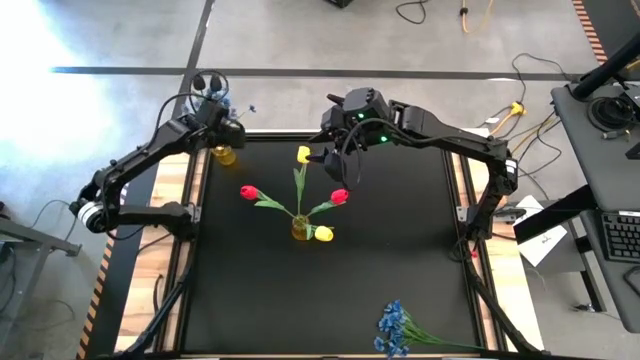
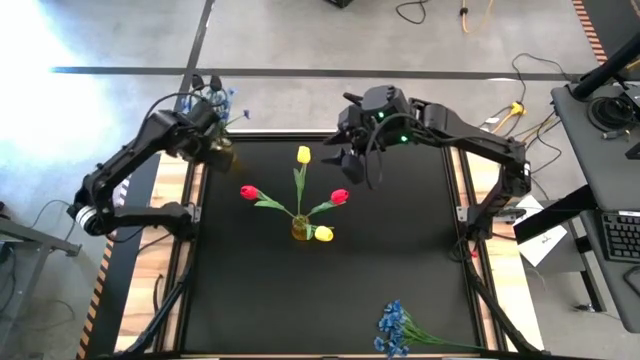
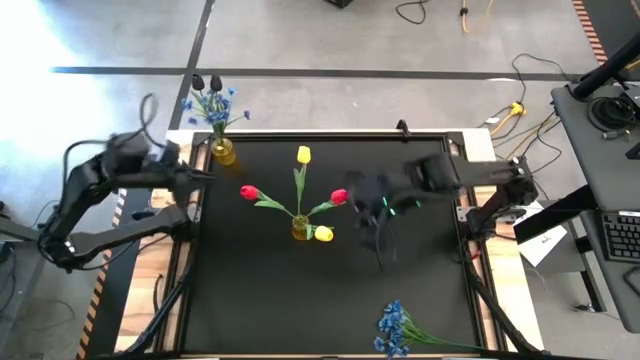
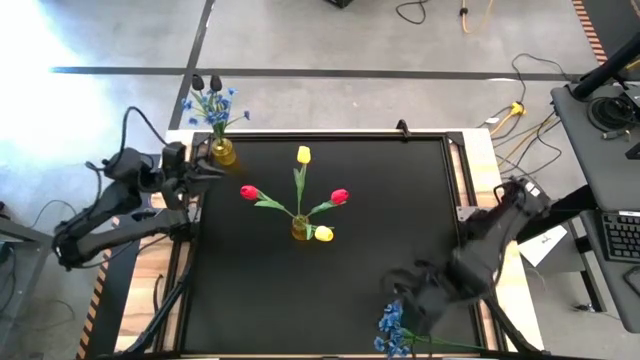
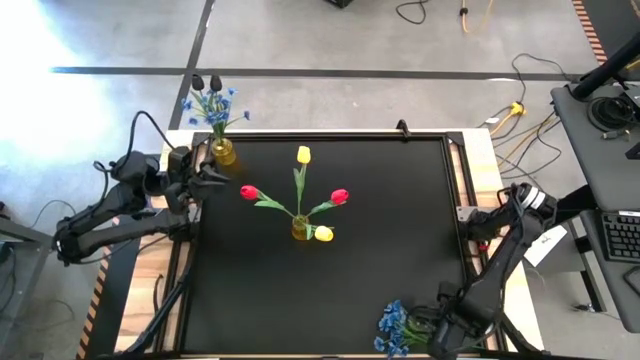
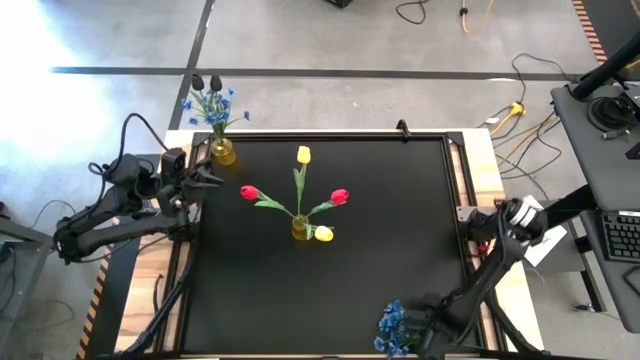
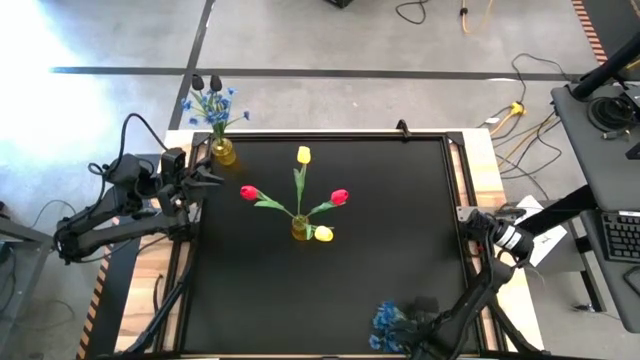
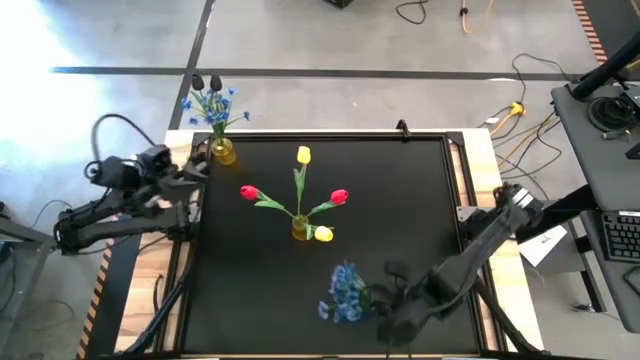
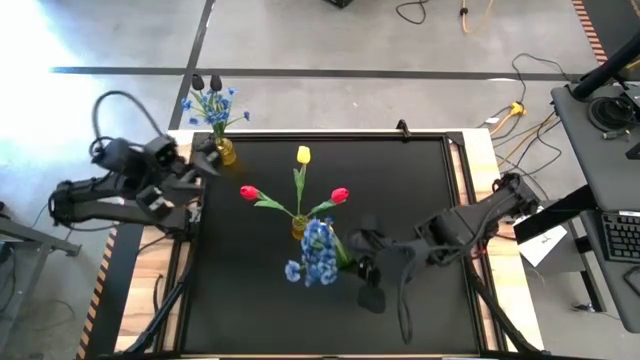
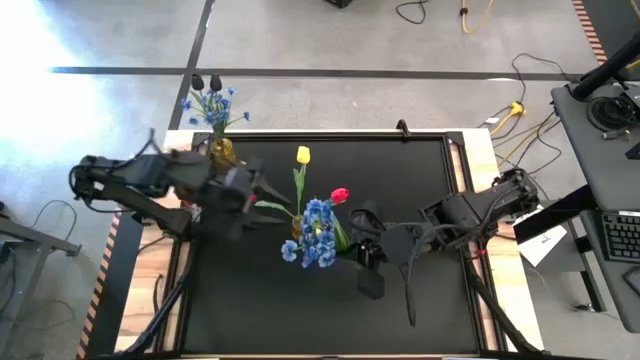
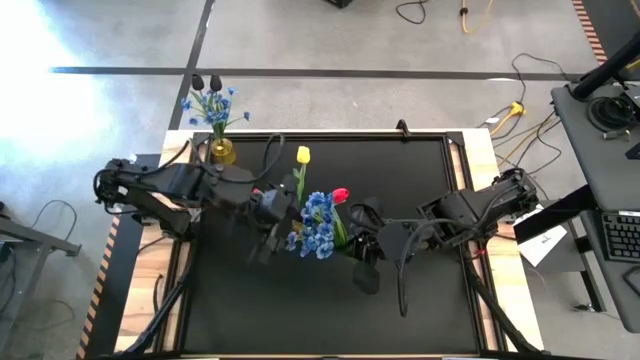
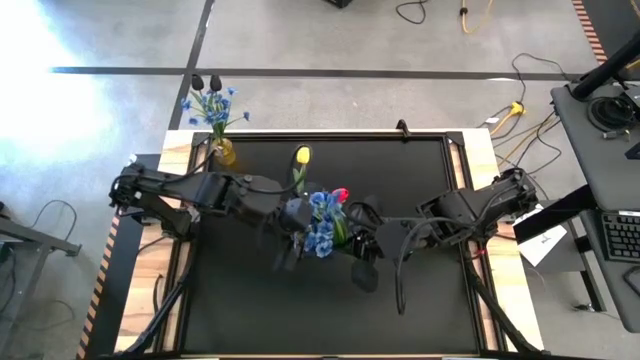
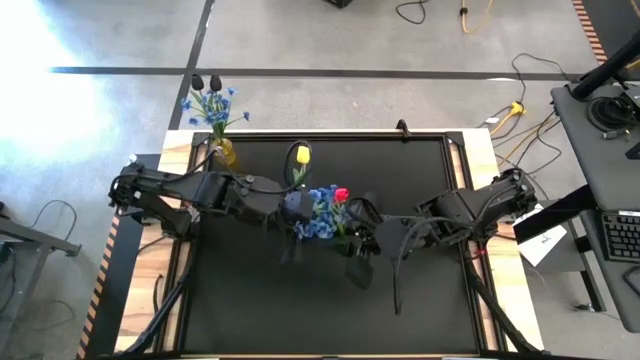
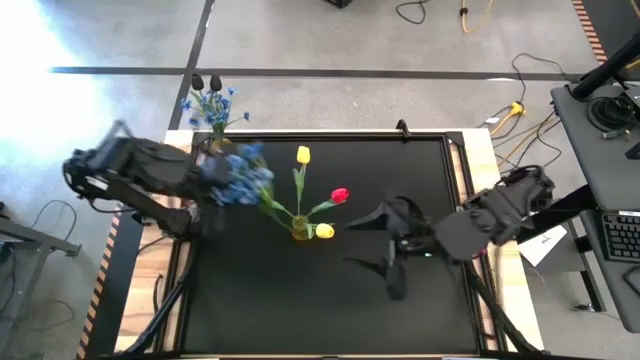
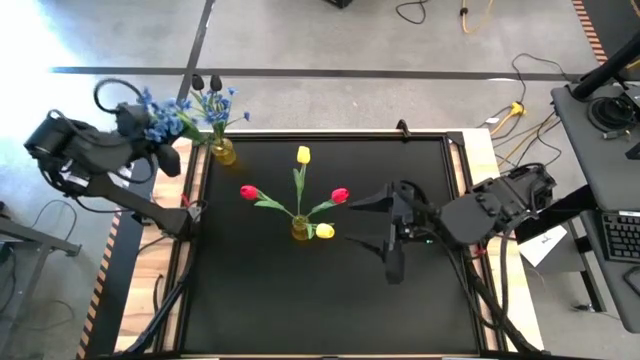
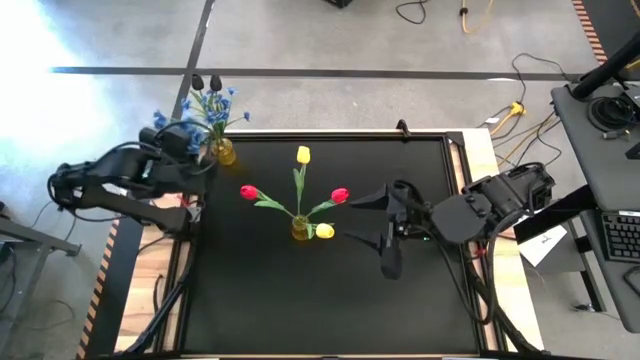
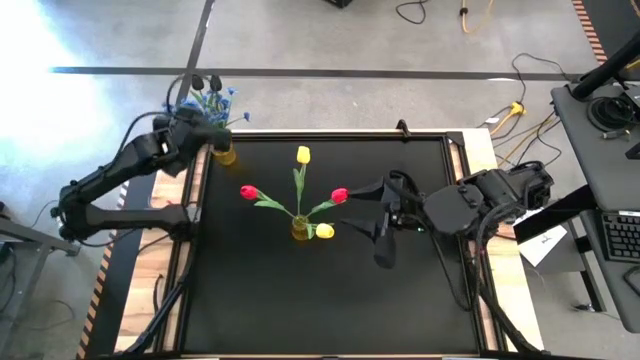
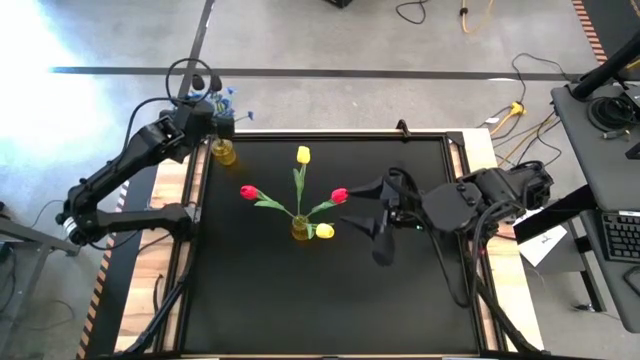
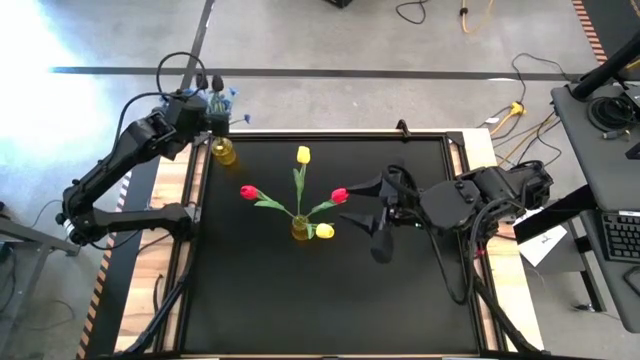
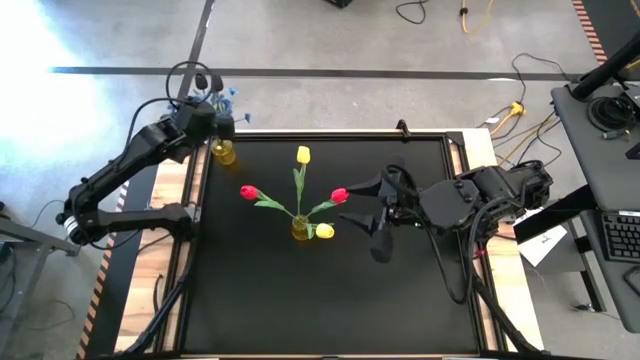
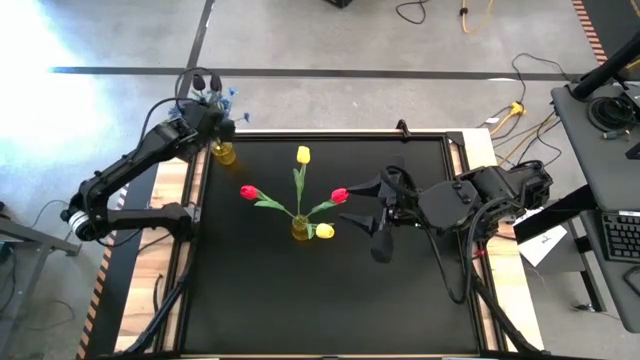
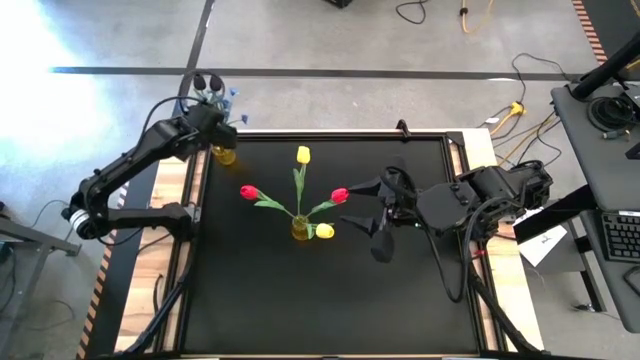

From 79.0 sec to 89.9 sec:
Task: Sort flowers into vase by color
Put the blue flowers into the top vase

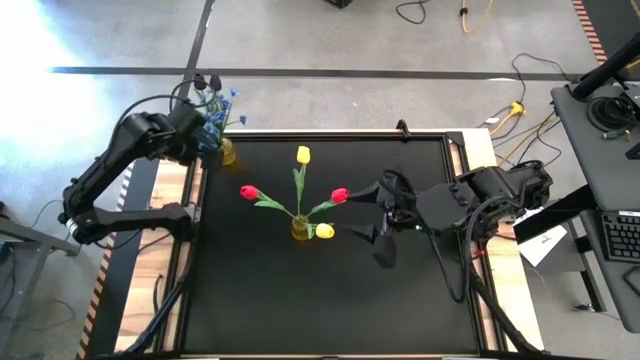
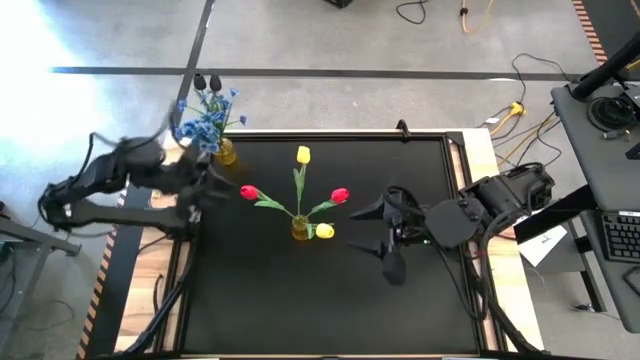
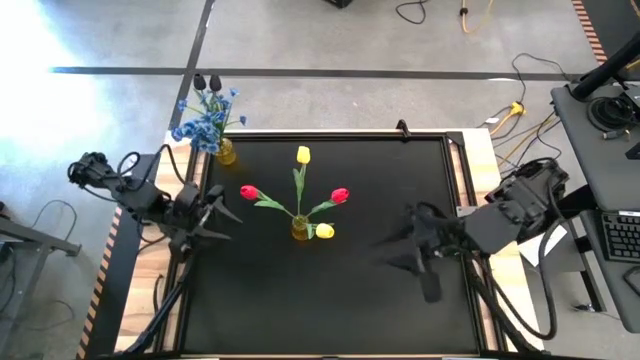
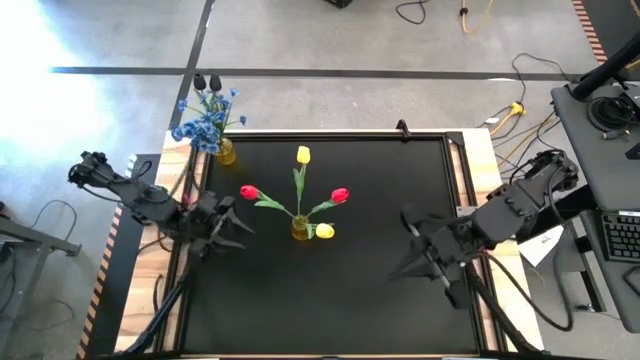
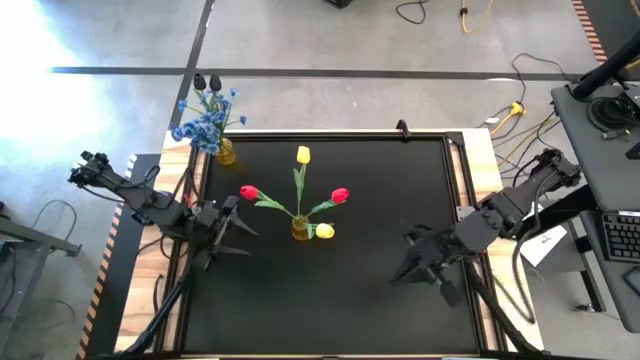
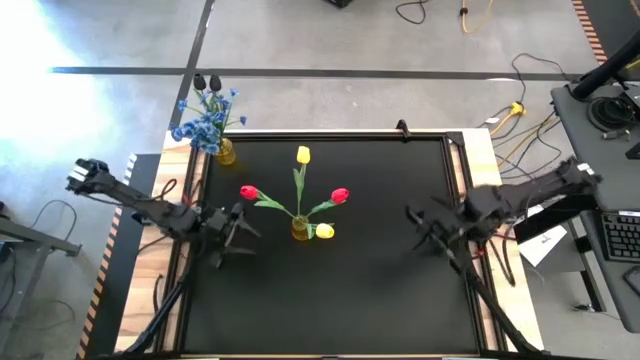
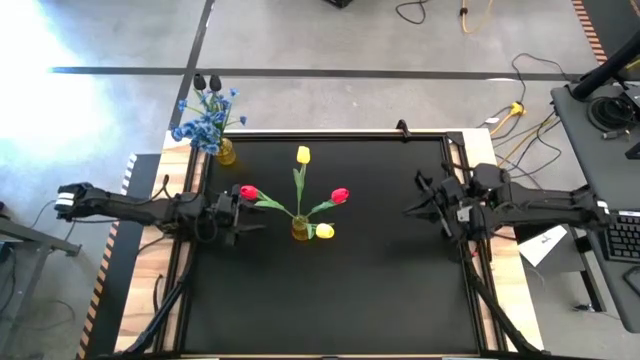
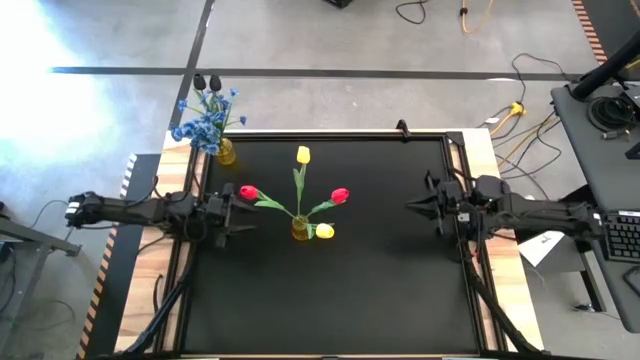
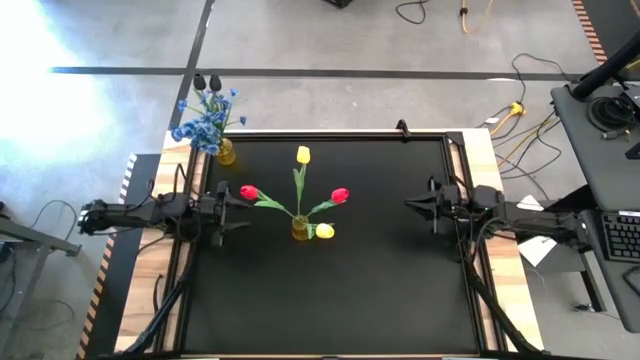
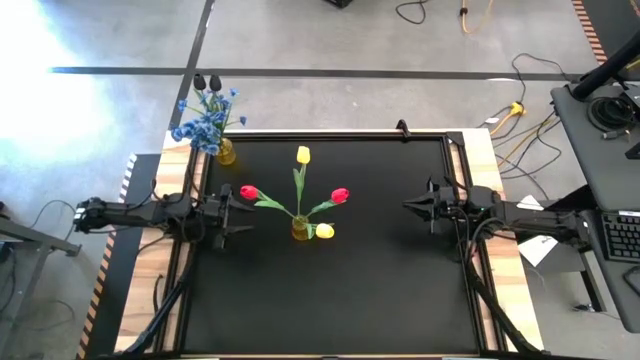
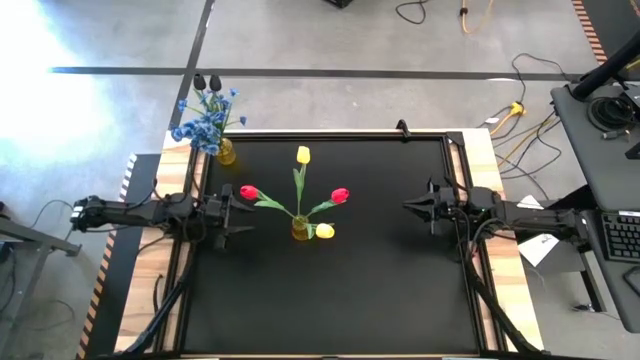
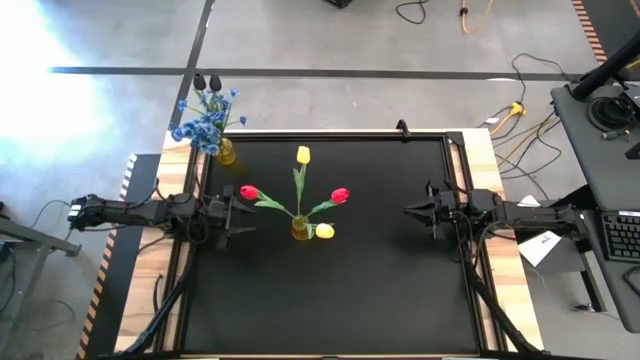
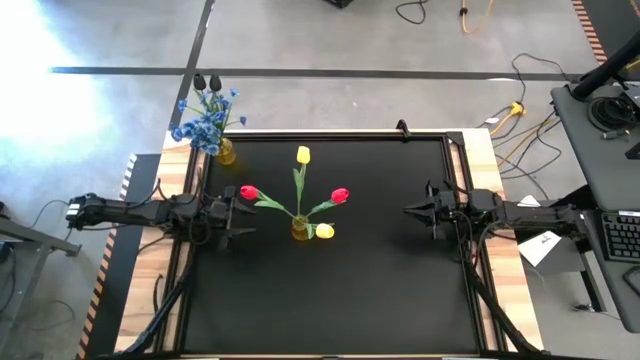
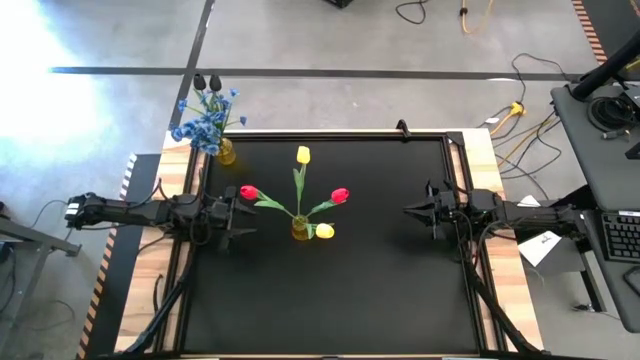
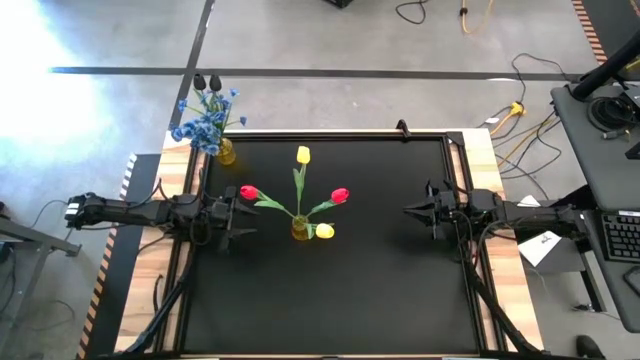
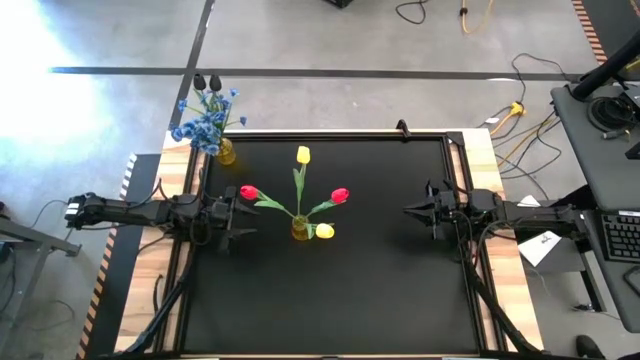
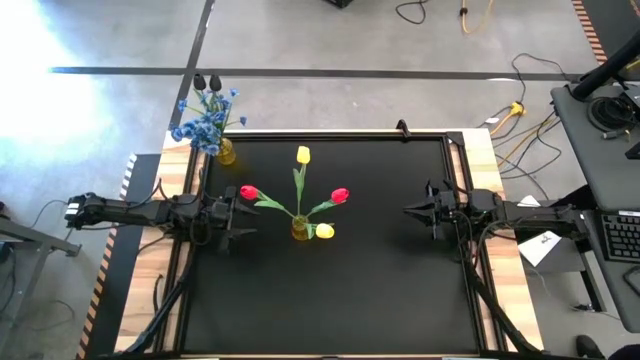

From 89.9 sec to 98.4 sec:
Return to Home Position
